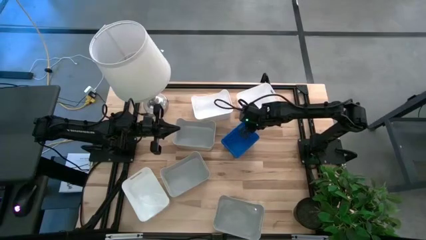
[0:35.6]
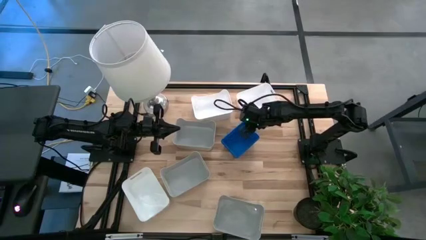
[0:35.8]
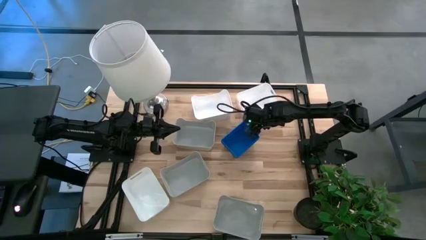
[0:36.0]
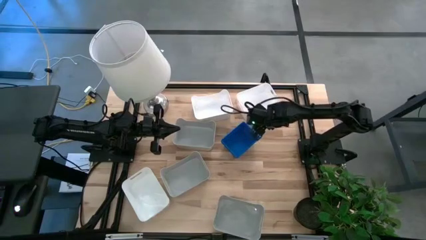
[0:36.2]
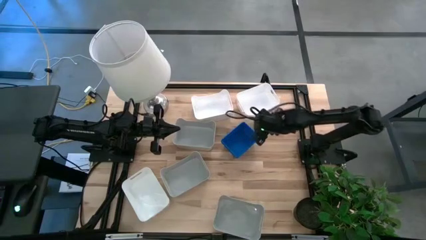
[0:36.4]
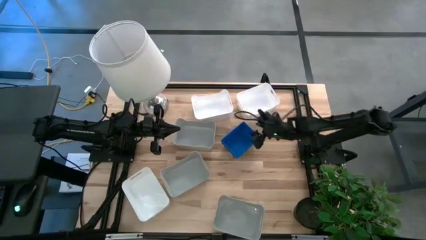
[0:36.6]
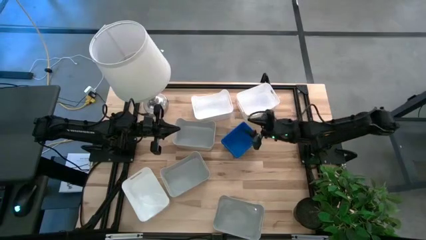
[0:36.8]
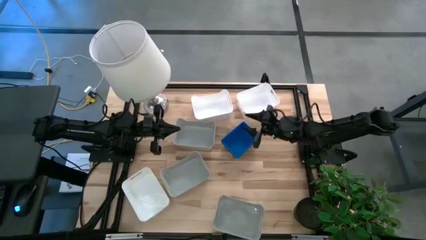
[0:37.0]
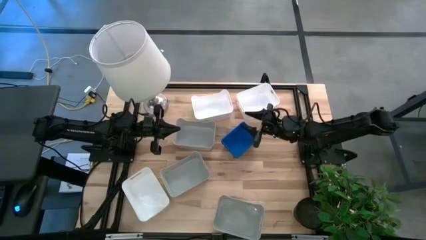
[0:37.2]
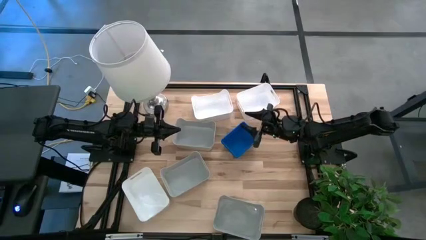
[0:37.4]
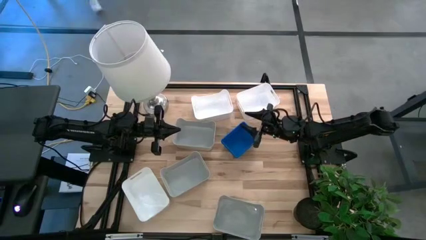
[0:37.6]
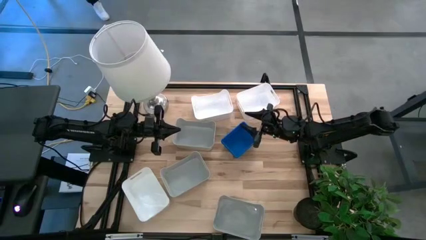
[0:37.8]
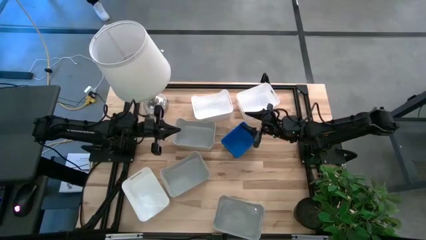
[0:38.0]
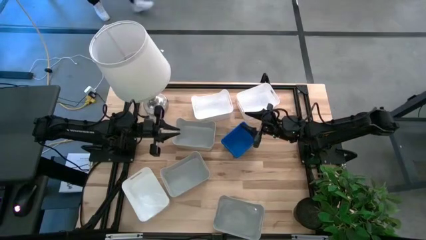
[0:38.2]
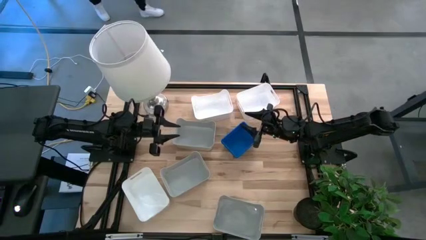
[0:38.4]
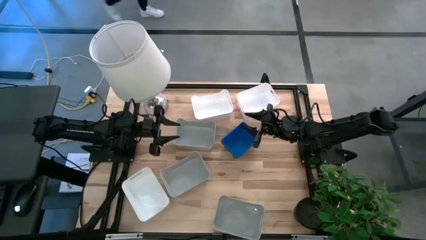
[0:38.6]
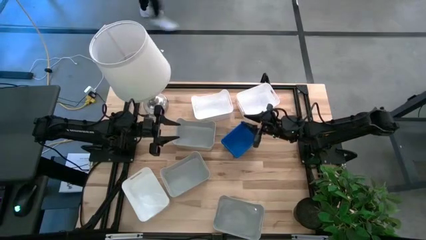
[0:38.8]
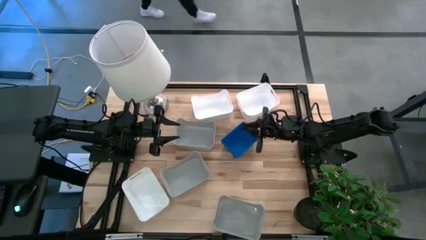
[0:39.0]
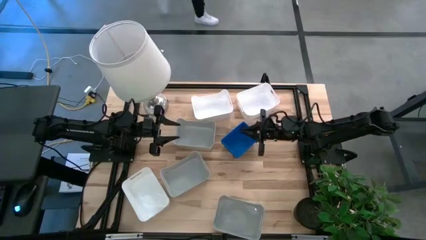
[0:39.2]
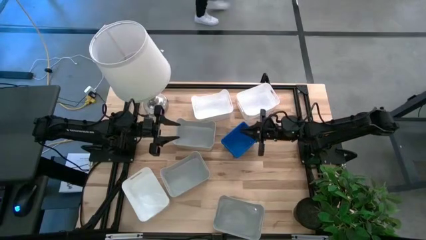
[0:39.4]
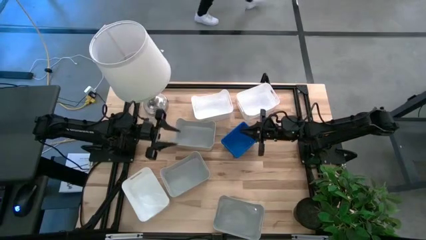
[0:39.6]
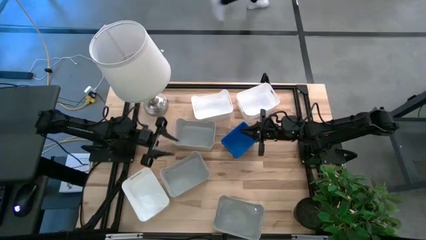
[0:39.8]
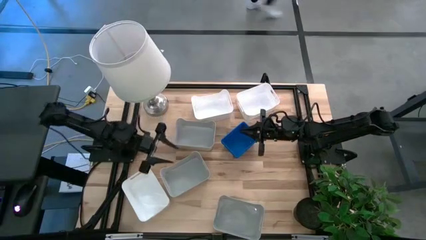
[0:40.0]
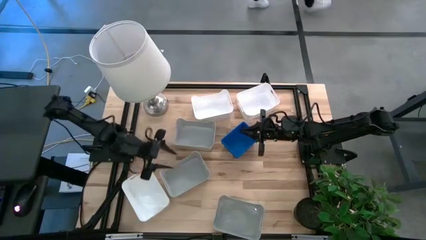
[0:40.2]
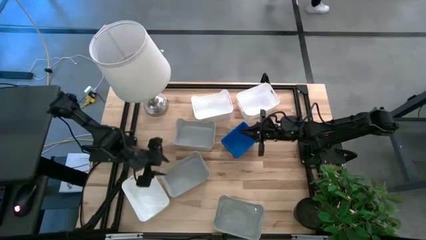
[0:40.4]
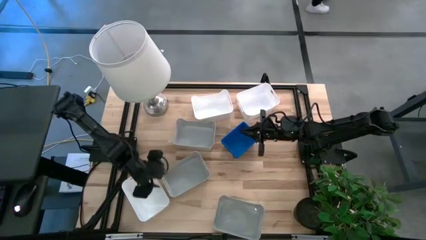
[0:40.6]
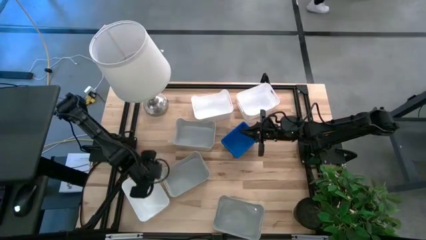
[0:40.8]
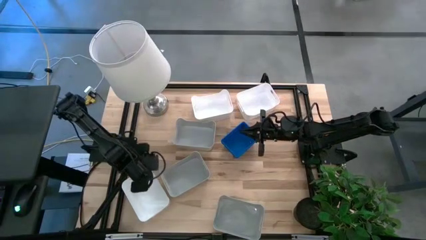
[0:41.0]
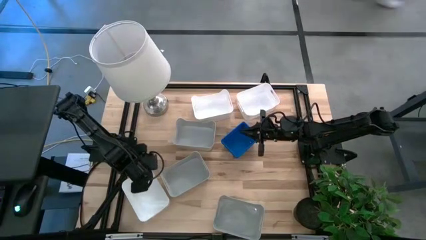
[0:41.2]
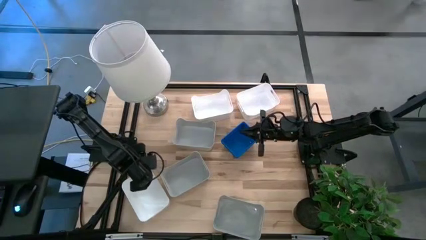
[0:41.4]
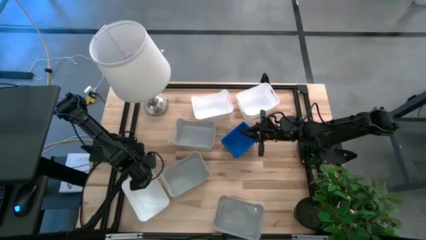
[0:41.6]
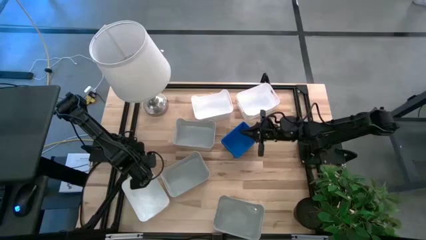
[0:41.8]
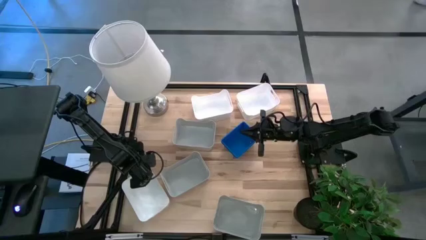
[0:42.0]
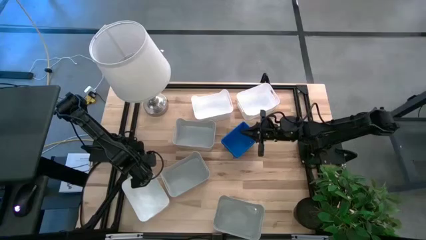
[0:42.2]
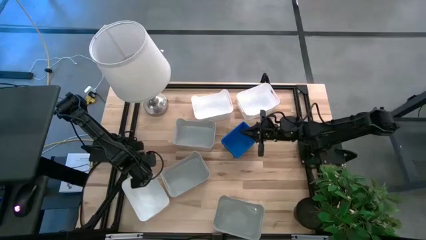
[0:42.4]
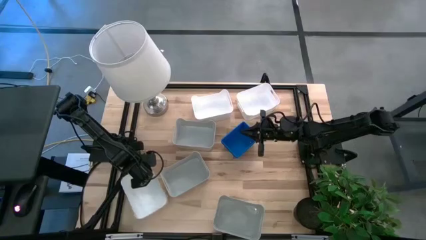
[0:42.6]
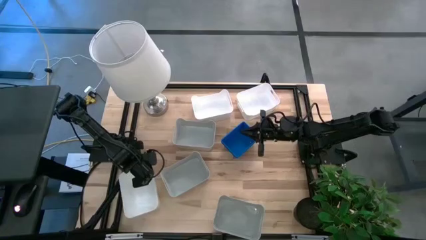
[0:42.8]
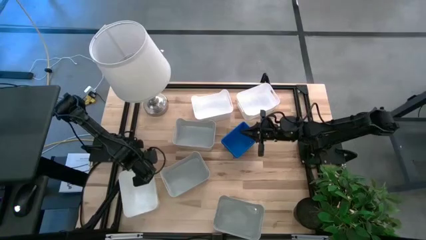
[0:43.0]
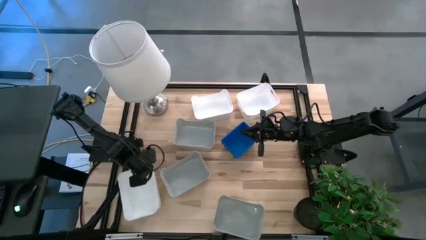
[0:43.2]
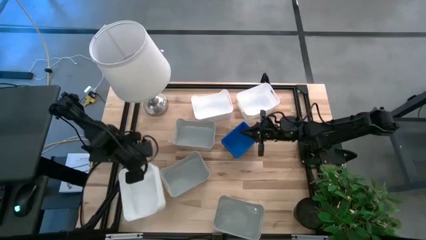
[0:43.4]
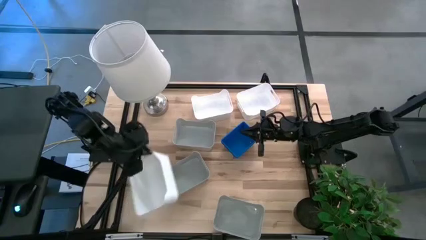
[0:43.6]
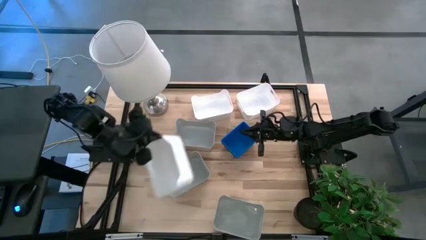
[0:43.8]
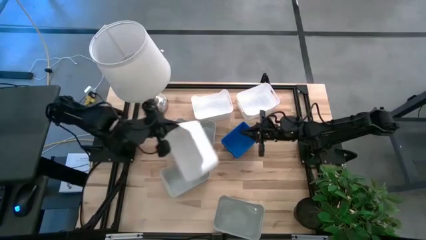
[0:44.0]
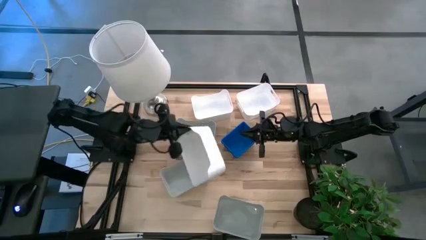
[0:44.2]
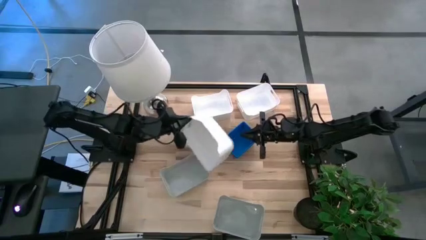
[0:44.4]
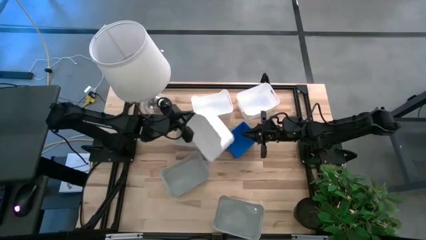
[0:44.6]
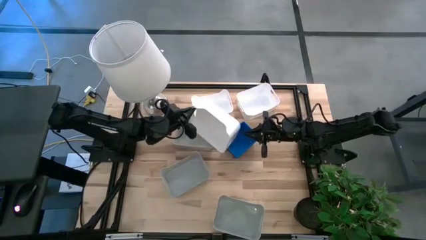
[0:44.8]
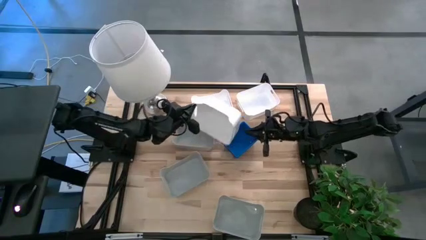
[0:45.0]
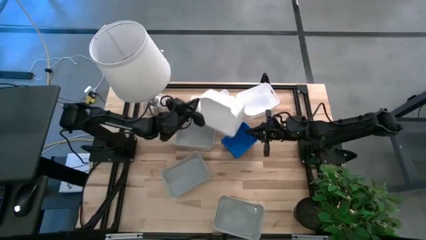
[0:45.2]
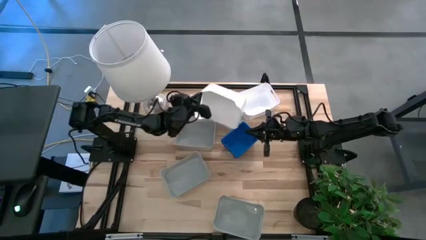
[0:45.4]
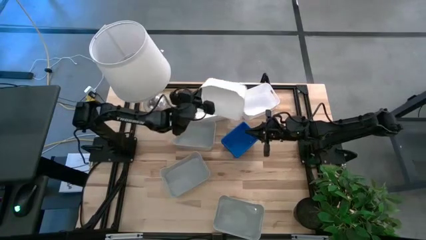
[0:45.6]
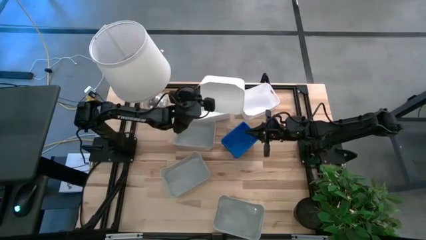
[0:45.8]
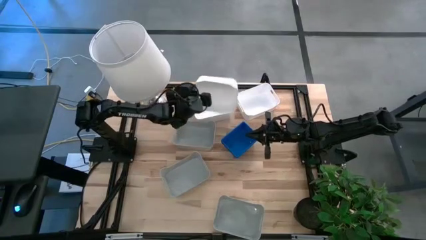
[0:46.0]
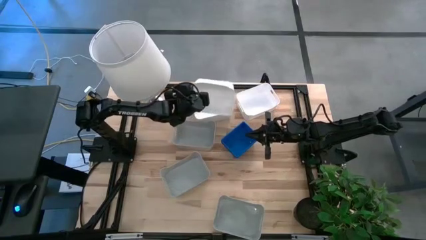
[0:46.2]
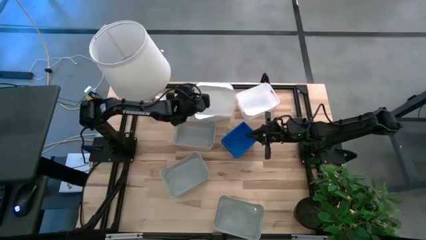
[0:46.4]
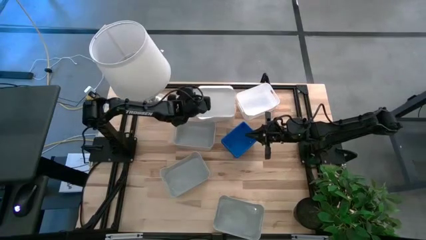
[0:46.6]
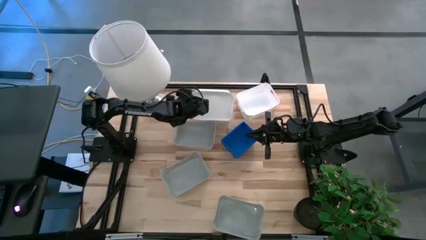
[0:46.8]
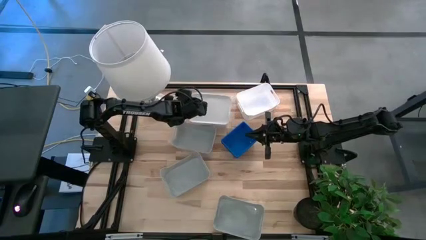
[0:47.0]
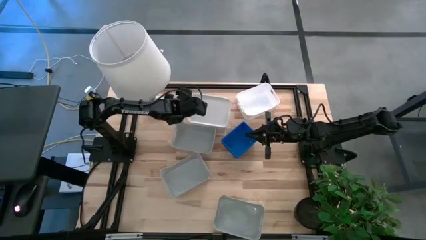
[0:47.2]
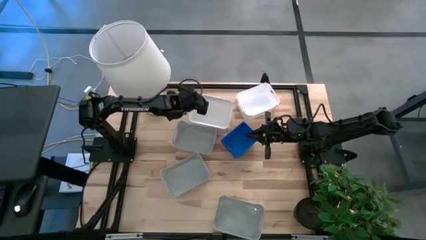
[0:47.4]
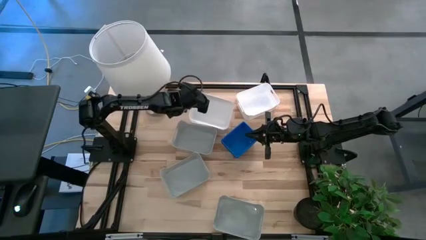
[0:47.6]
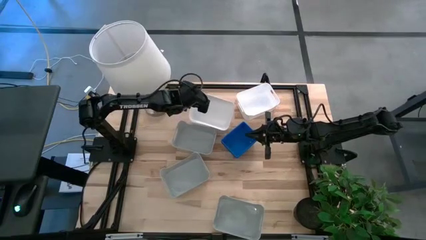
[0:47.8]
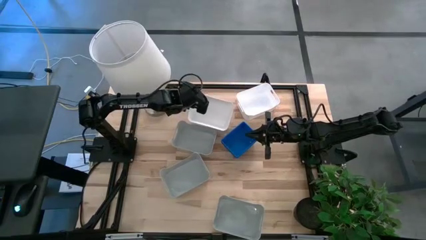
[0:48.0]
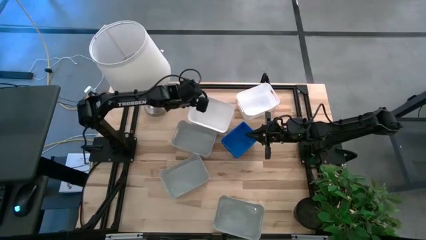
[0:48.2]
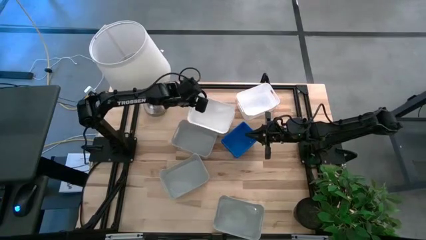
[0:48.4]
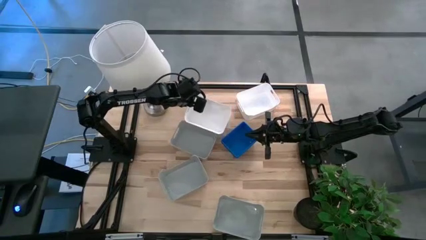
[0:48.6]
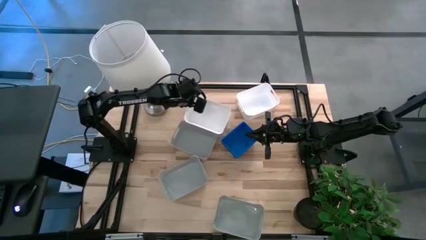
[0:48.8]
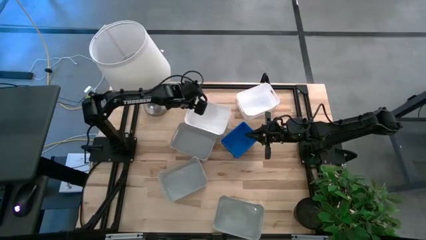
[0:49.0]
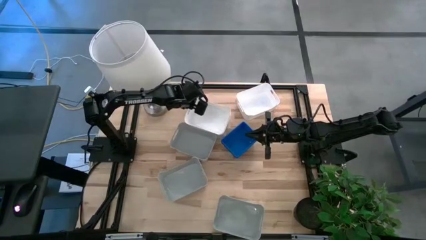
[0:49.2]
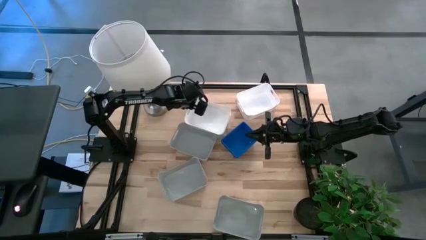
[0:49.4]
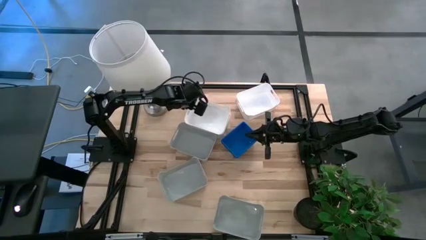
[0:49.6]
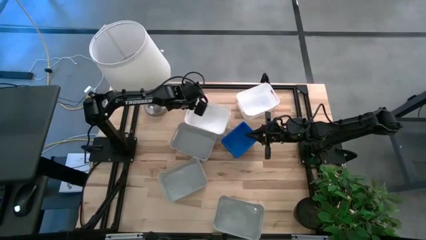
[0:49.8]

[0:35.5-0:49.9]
Stack the bottom white bin on top of the top left white bin
